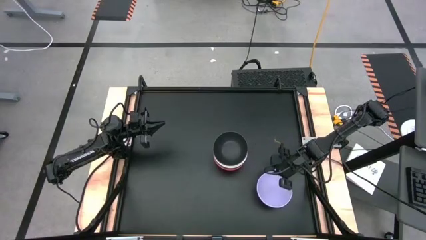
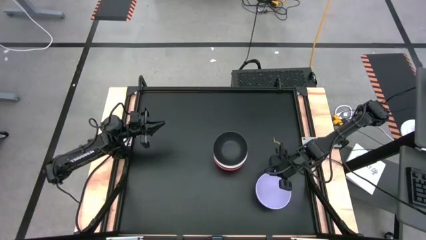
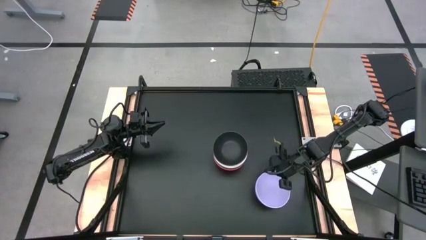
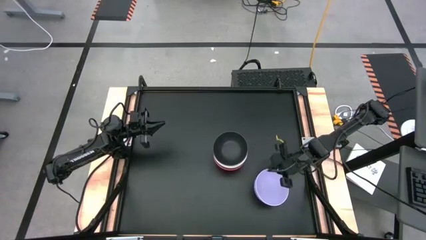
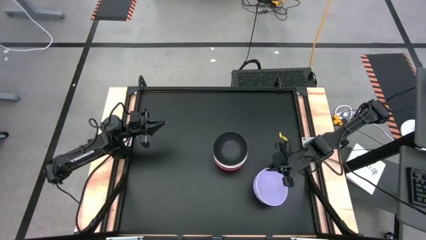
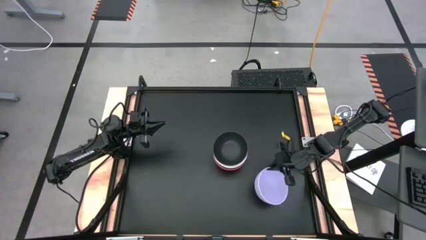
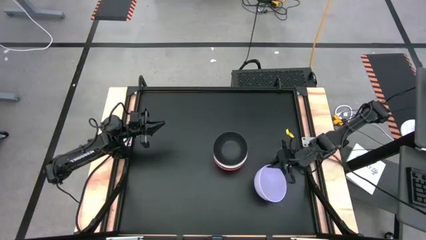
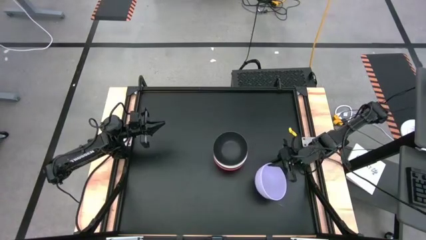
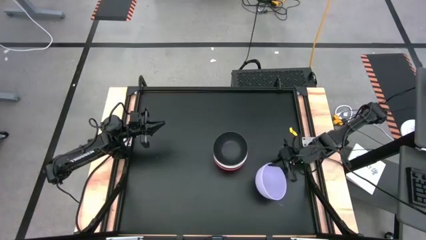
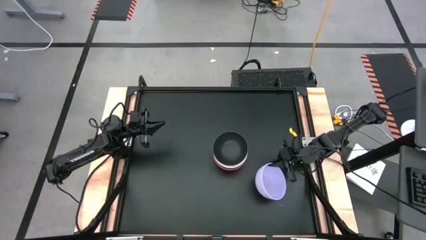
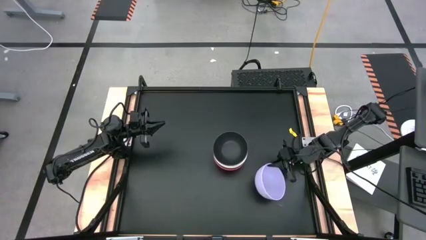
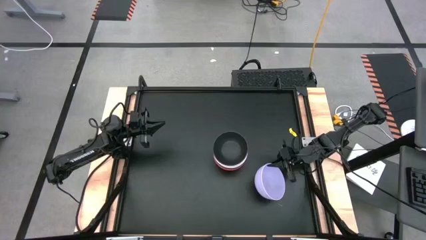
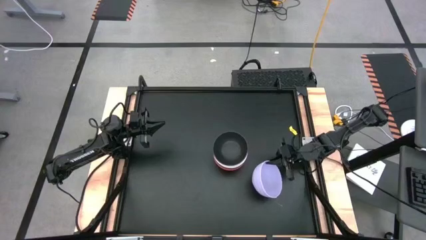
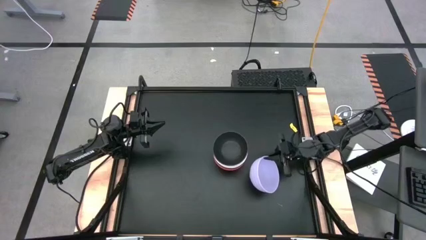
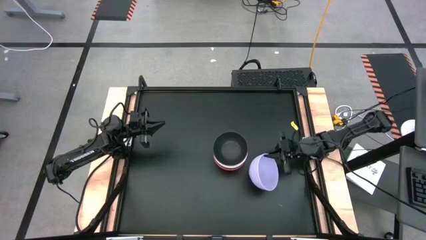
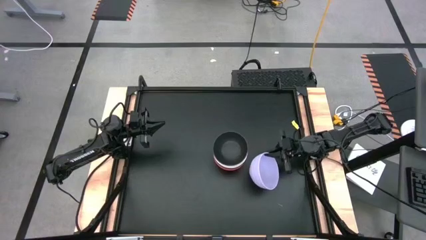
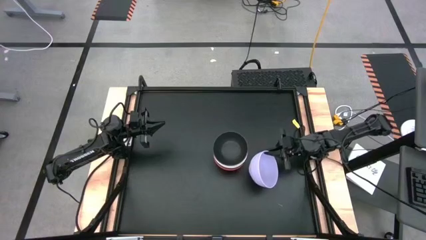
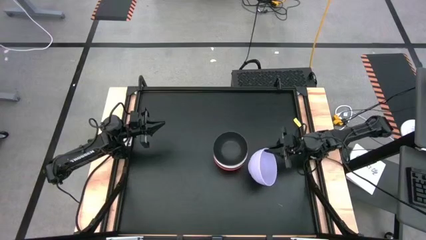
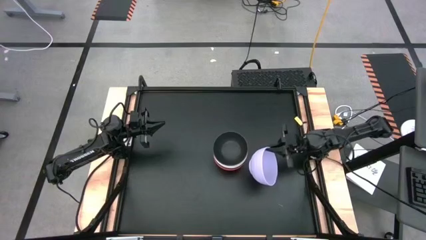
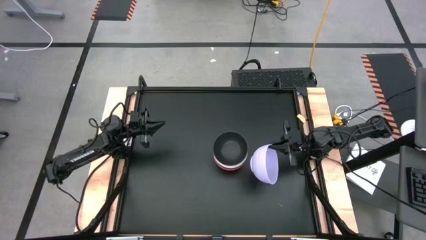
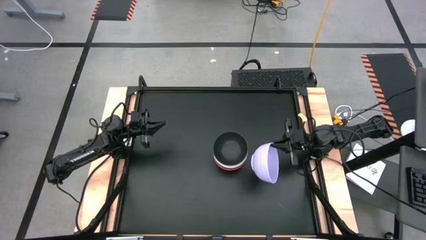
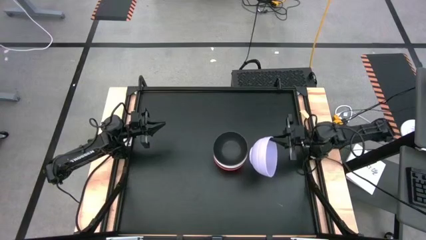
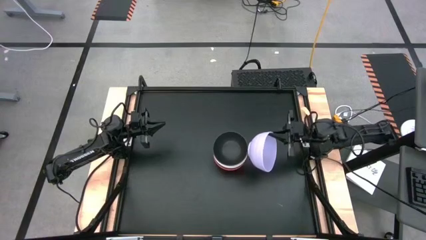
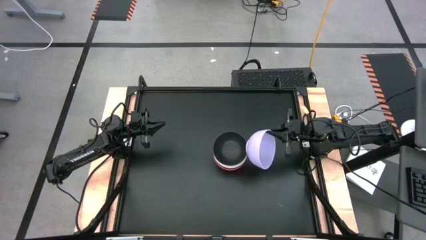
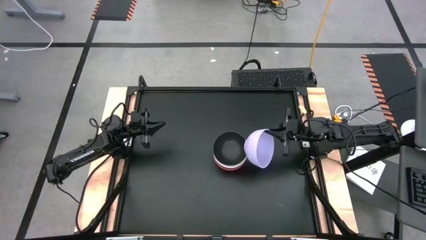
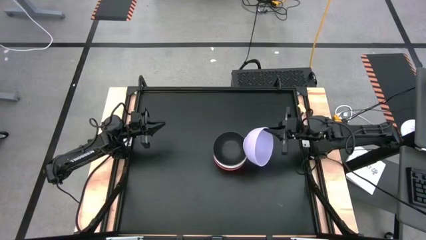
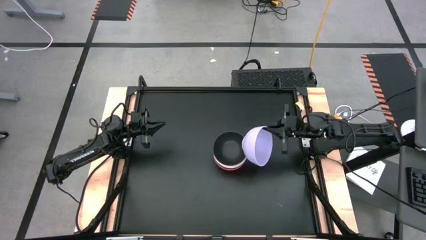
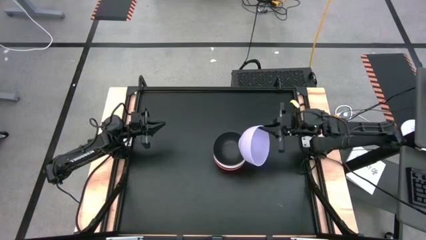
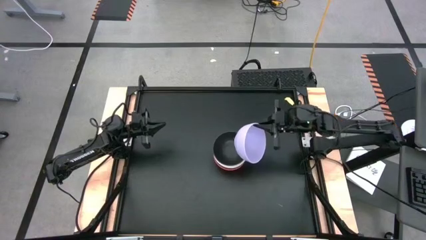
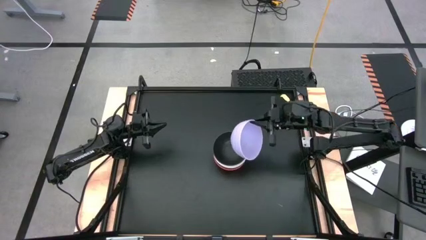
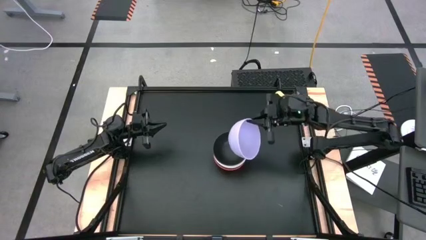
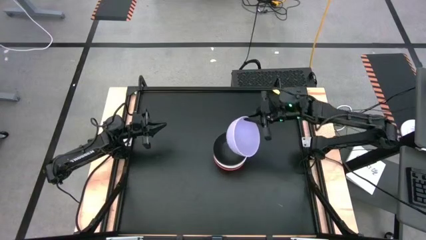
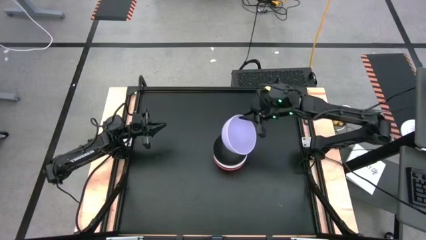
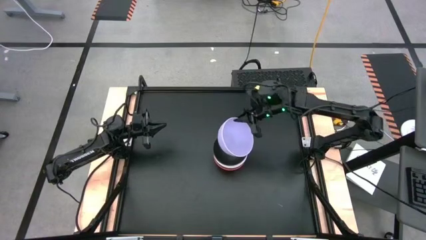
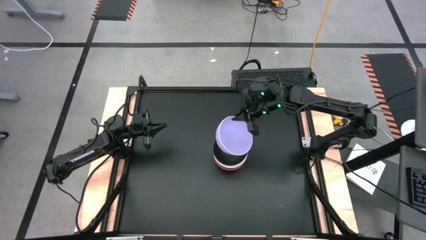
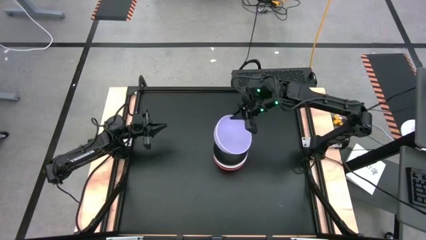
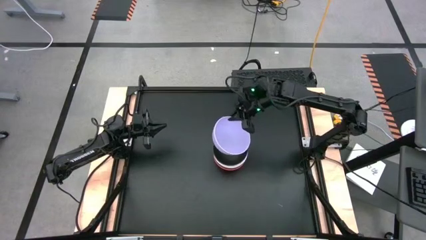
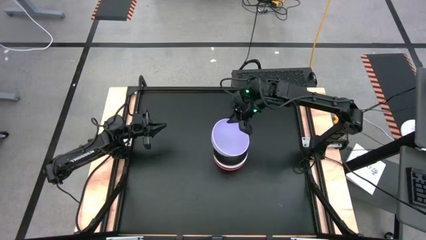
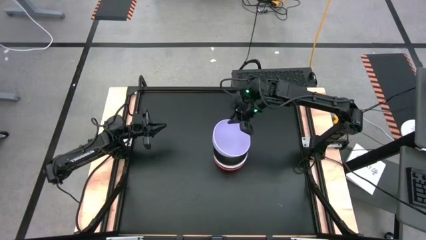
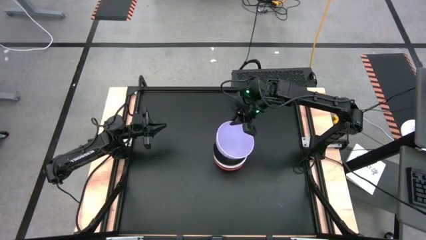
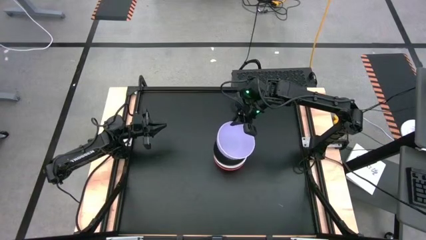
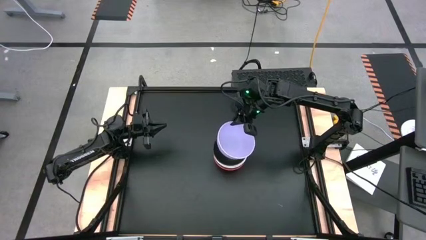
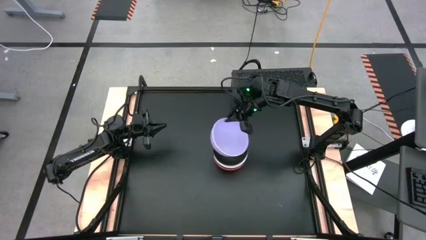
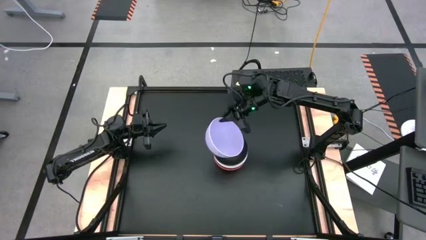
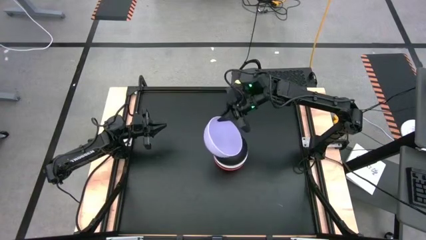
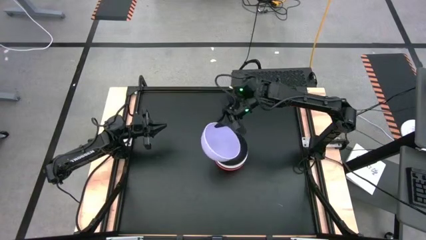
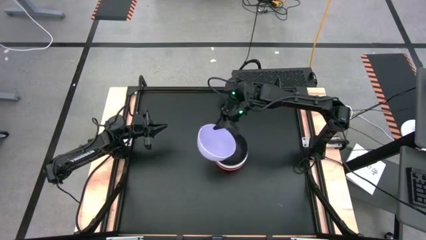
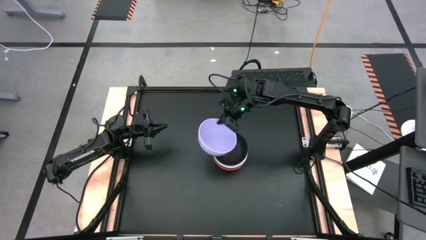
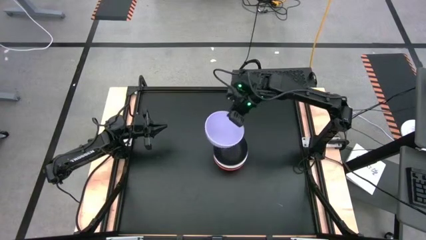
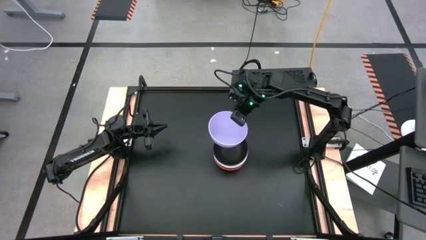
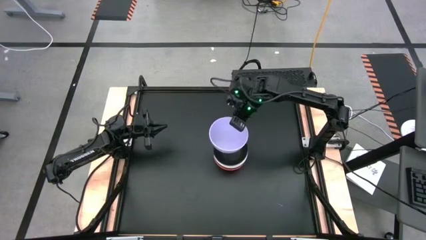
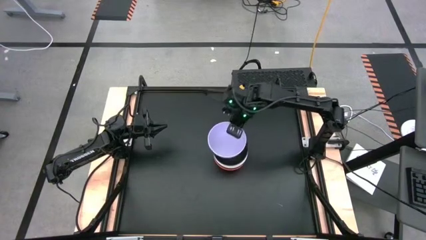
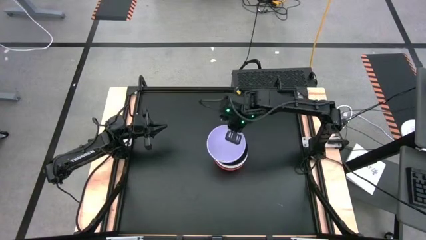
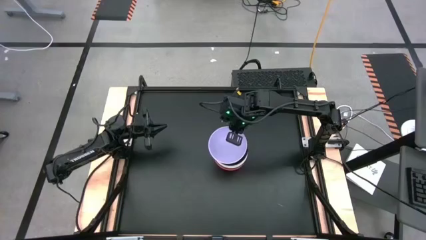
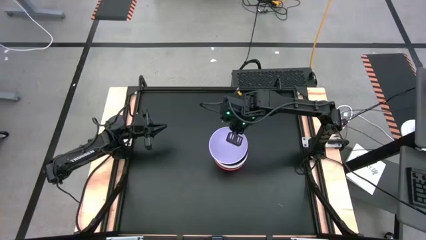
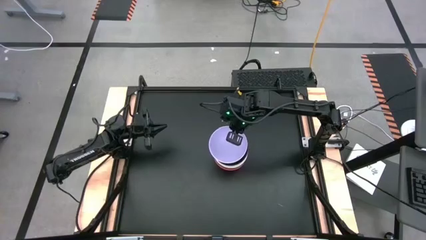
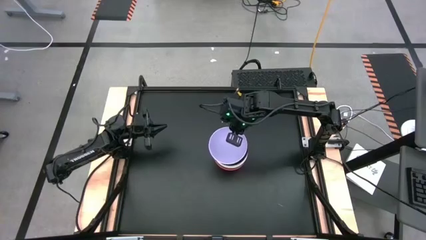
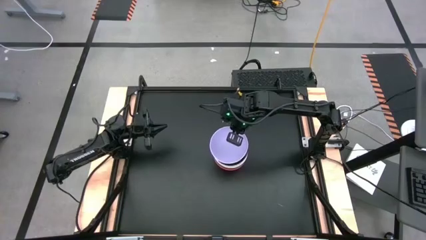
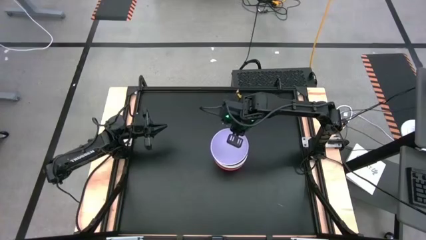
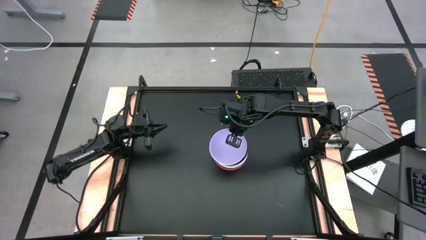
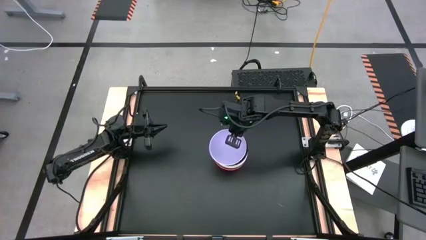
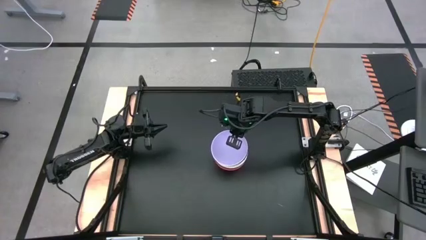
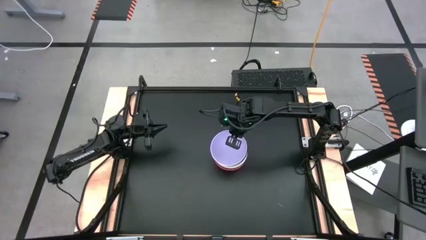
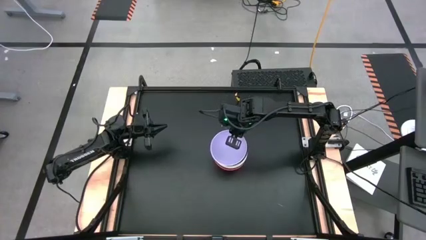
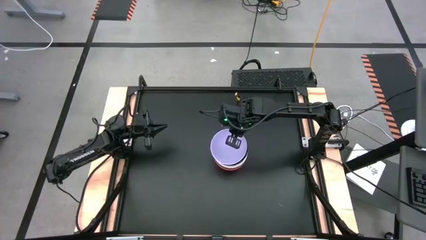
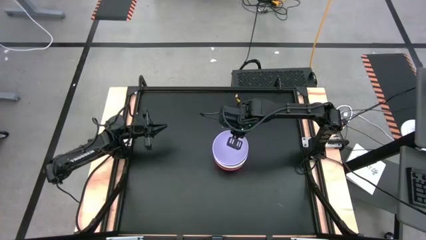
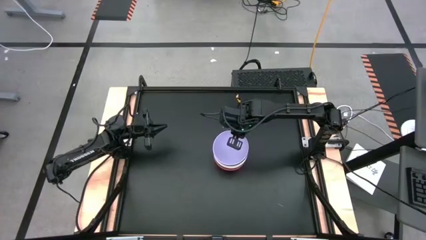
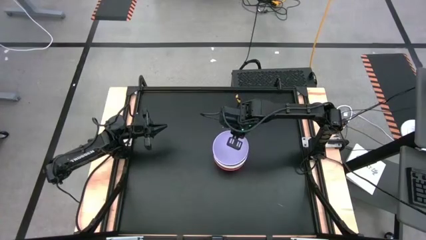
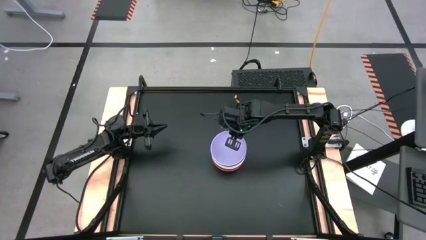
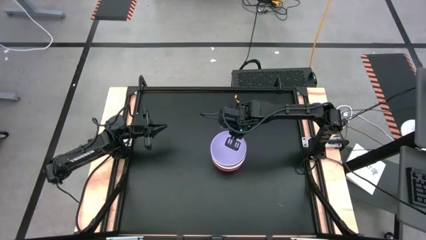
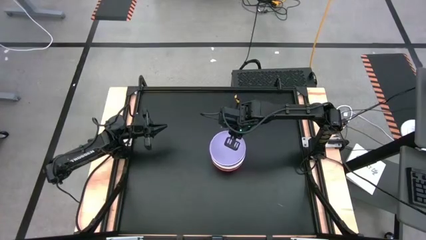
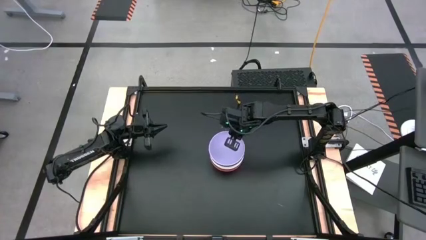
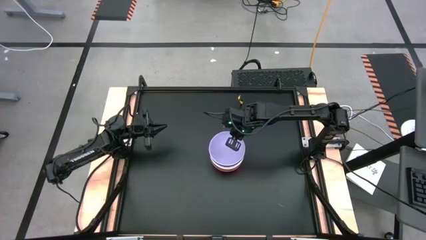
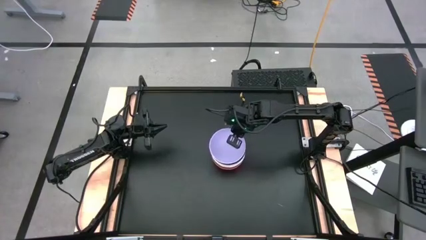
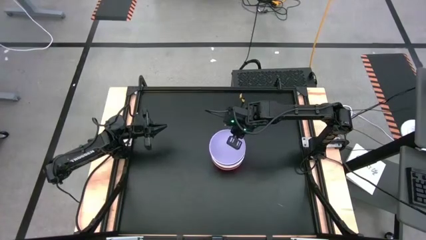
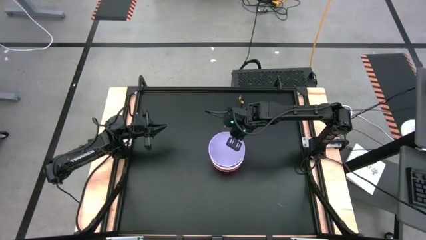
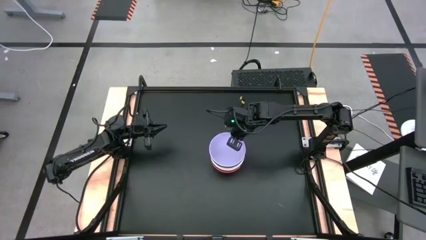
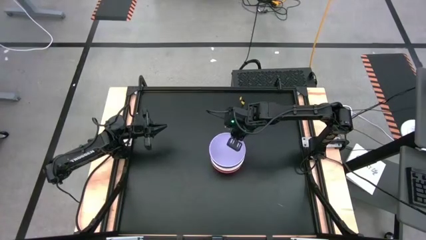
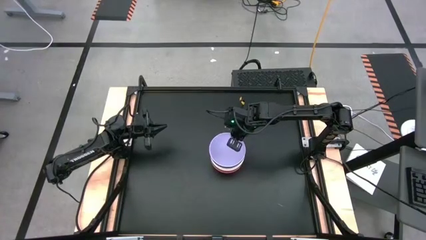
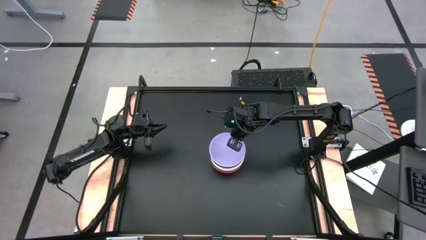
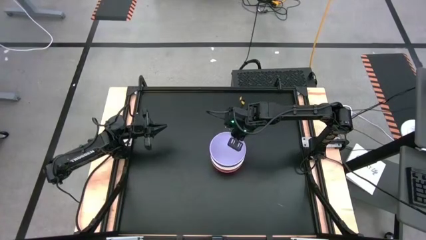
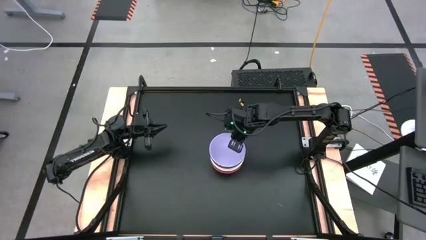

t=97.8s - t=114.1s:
Task: Nest bowls inside each other
Stack the purple bowl on top of the black bowl
